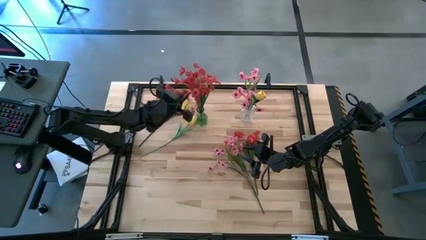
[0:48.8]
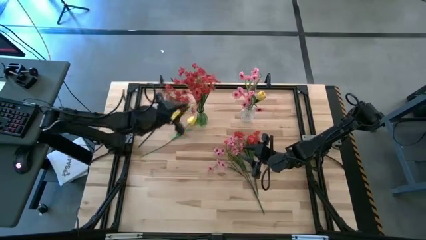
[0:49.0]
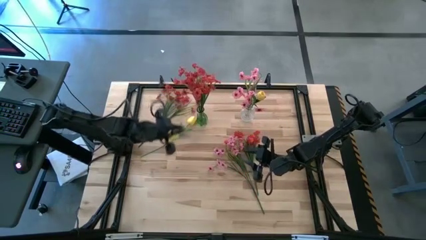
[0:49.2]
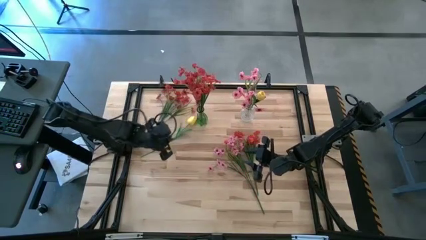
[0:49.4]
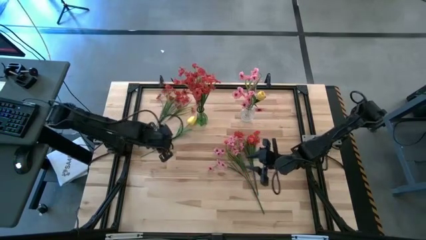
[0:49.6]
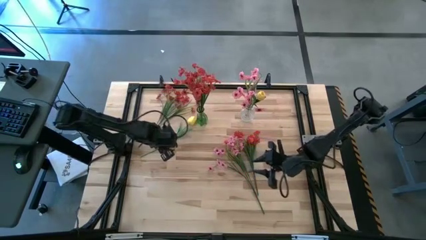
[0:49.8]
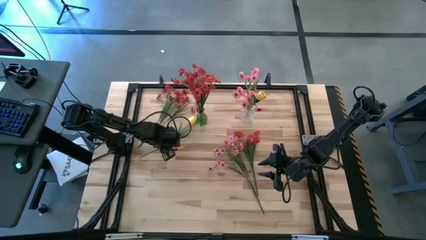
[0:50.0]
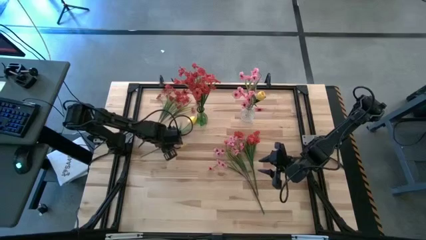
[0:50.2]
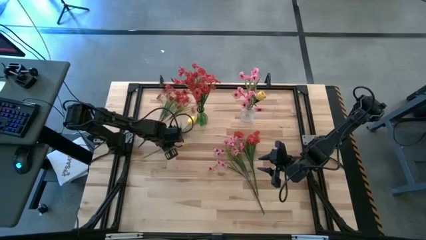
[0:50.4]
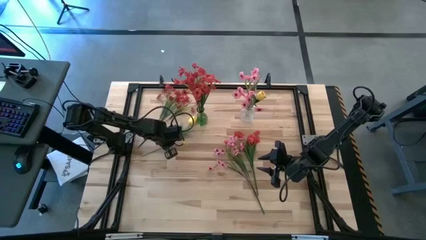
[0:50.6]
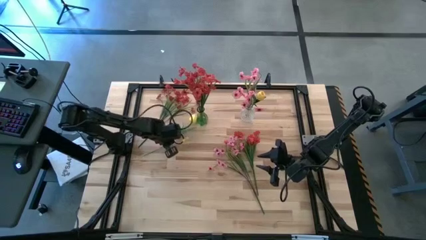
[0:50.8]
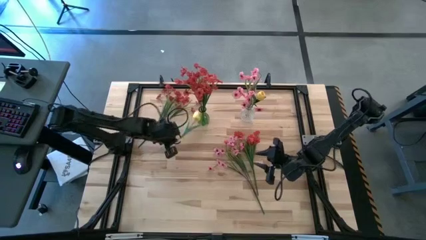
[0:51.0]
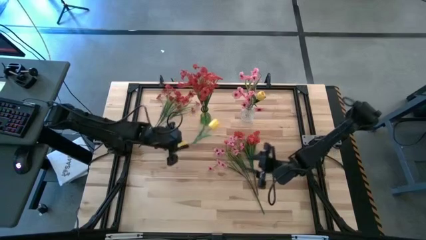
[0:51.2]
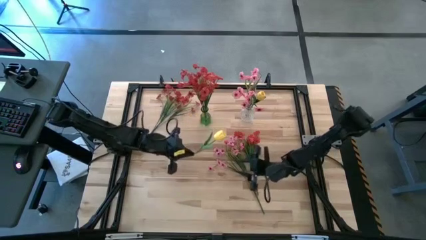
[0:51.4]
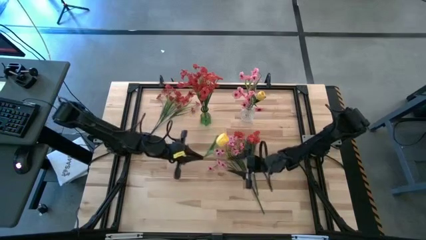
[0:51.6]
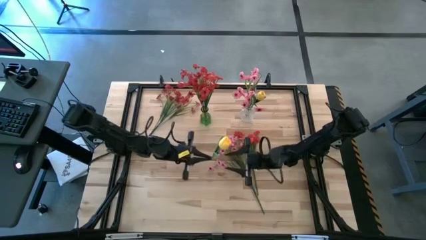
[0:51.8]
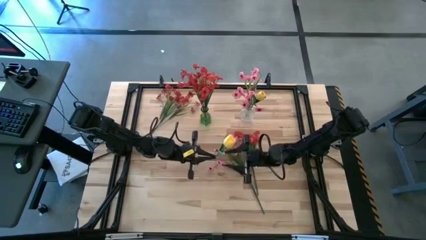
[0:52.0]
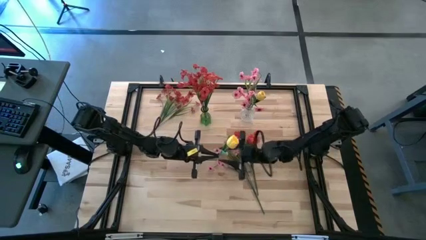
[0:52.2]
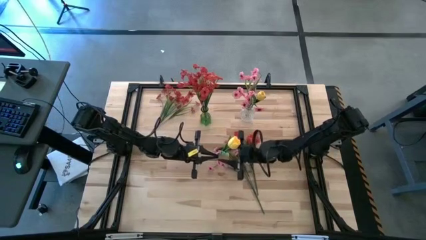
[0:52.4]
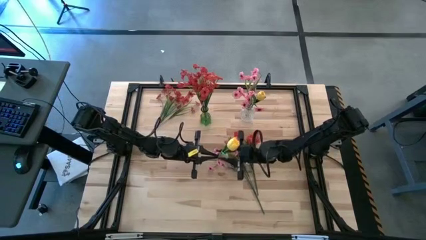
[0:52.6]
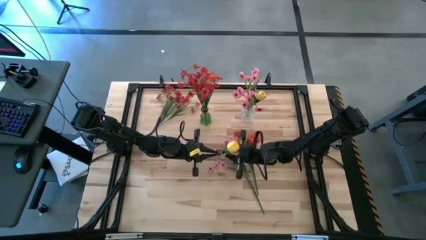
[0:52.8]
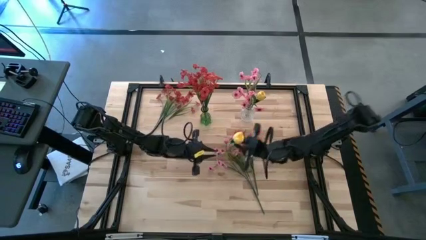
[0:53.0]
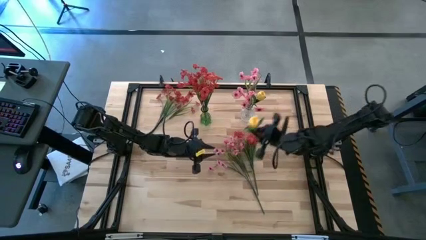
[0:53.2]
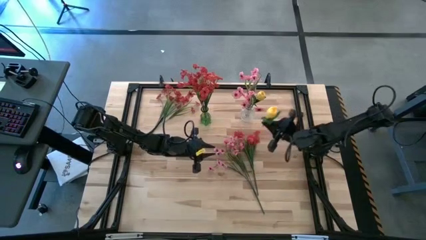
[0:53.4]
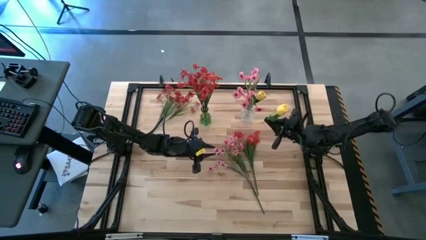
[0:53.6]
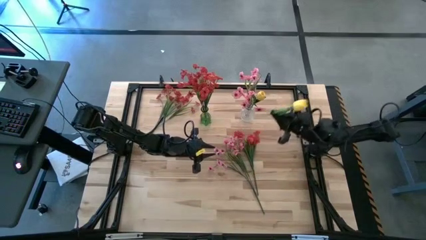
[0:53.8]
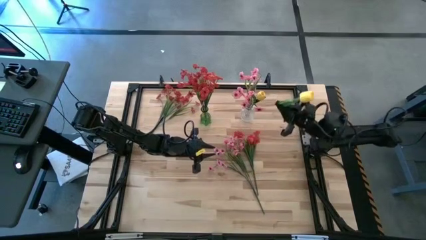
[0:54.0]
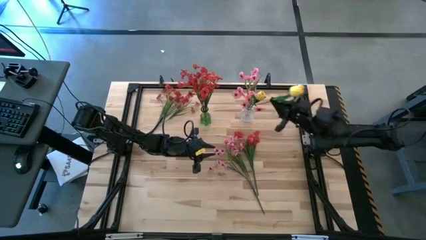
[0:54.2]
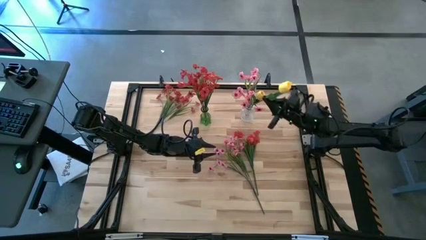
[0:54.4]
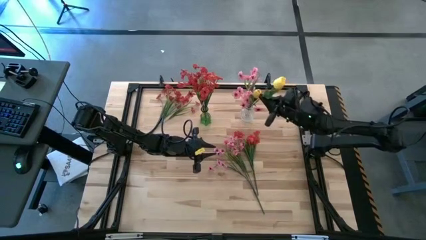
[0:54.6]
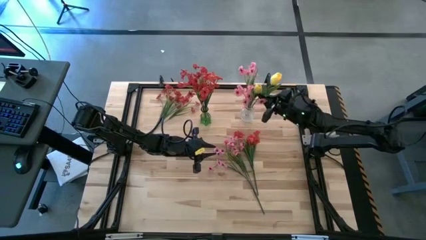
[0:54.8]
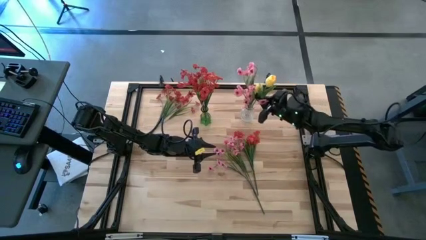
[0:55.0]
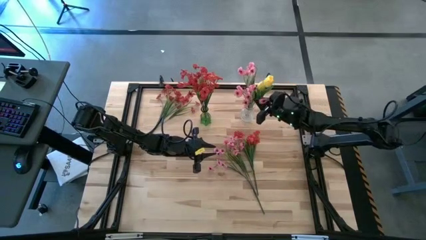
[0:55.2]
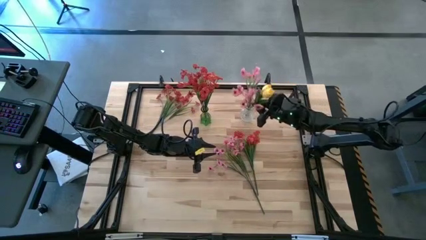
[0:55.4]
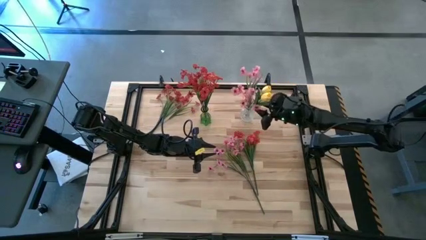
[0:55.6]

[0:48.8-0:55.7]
Task: Sort flowers into vase by color
Put the yellow flower into the transparent vase

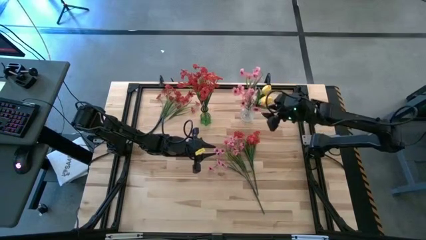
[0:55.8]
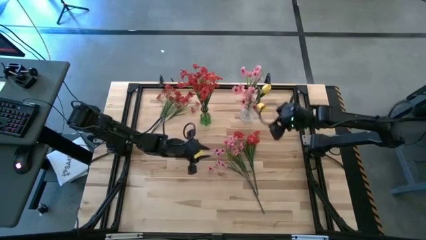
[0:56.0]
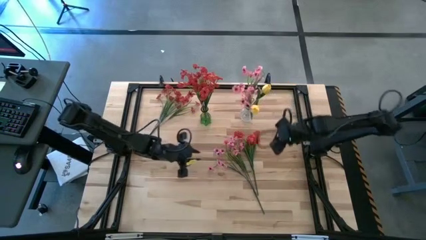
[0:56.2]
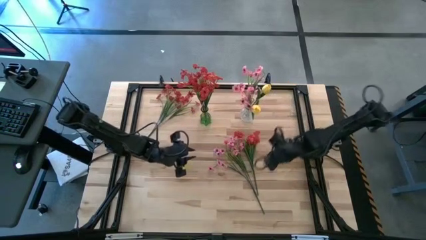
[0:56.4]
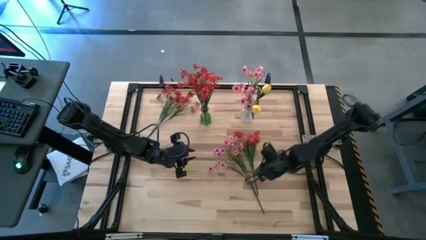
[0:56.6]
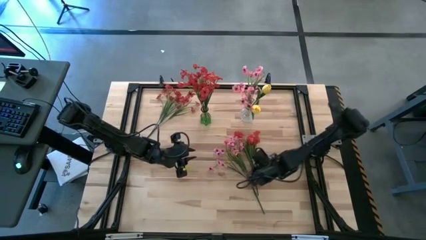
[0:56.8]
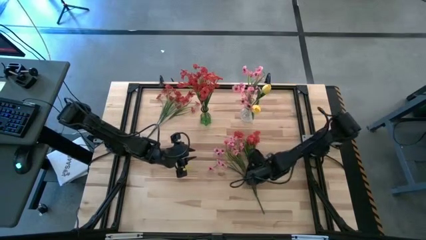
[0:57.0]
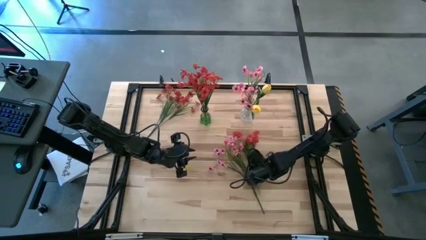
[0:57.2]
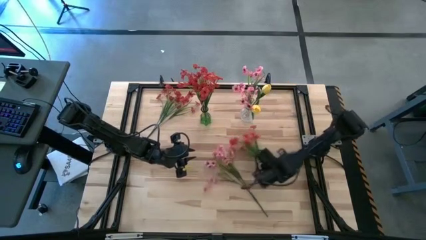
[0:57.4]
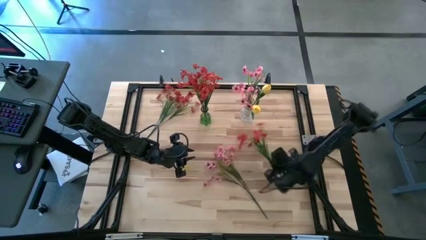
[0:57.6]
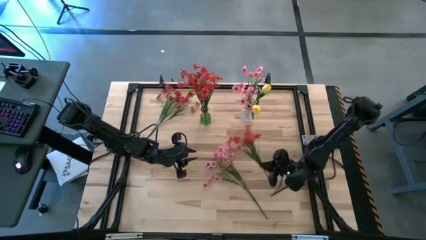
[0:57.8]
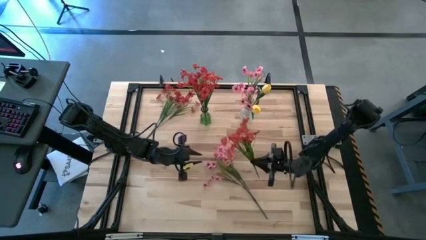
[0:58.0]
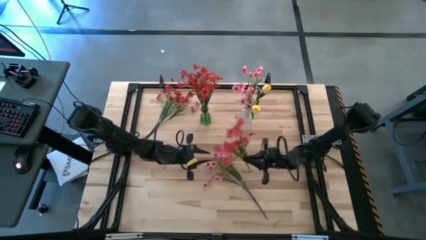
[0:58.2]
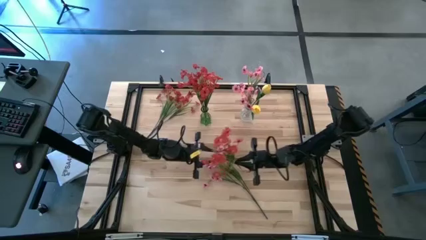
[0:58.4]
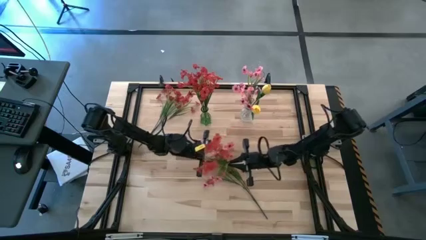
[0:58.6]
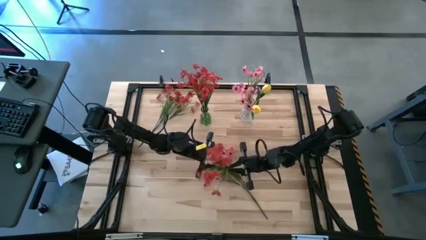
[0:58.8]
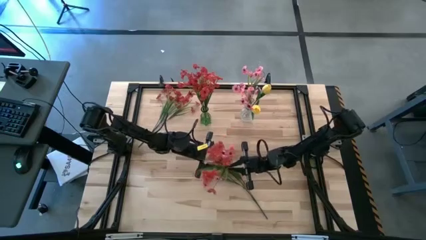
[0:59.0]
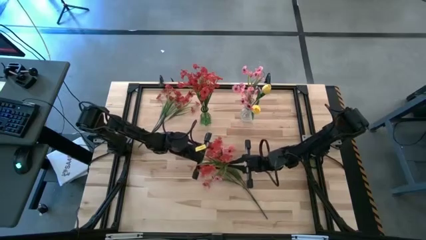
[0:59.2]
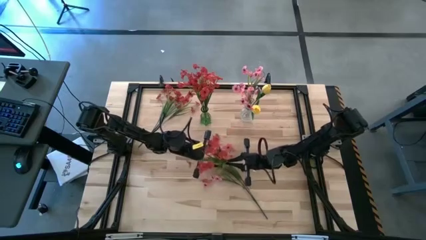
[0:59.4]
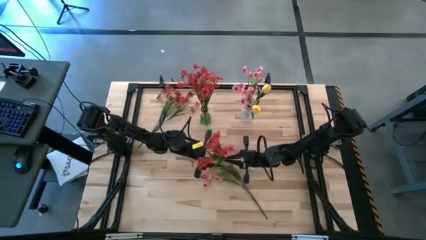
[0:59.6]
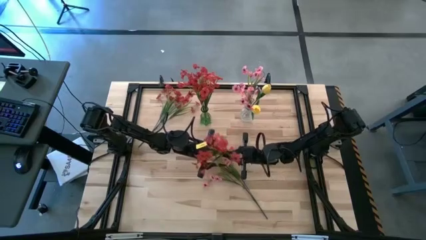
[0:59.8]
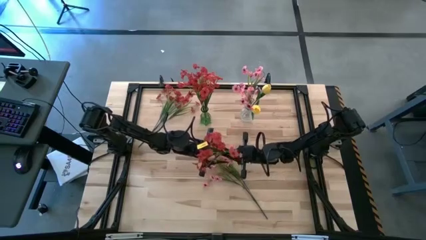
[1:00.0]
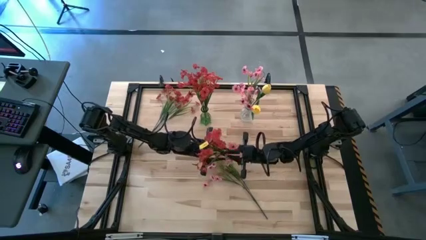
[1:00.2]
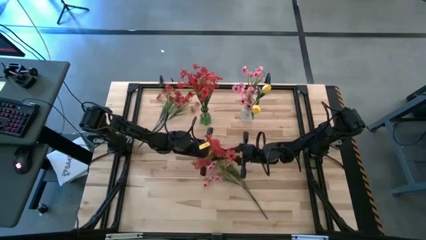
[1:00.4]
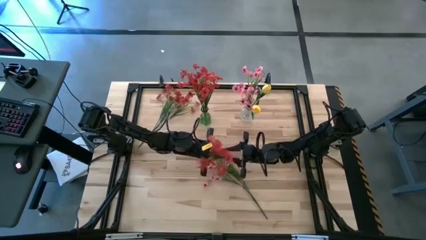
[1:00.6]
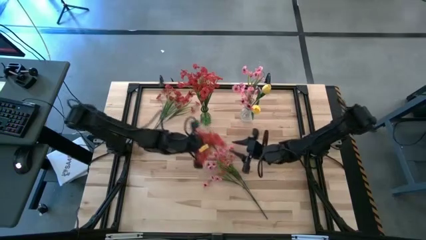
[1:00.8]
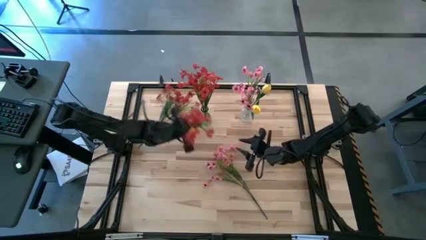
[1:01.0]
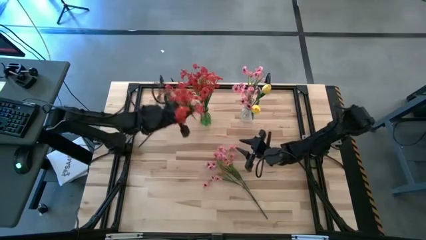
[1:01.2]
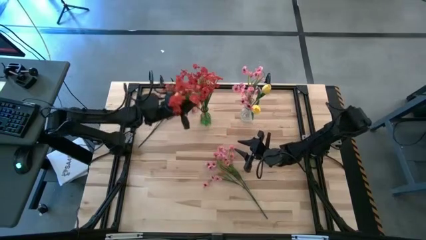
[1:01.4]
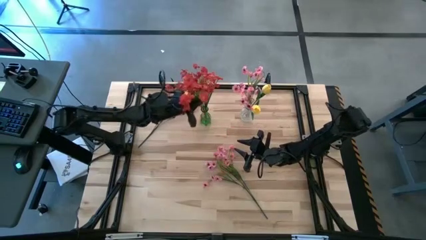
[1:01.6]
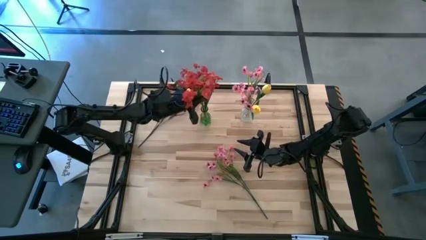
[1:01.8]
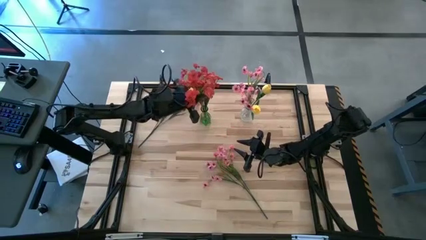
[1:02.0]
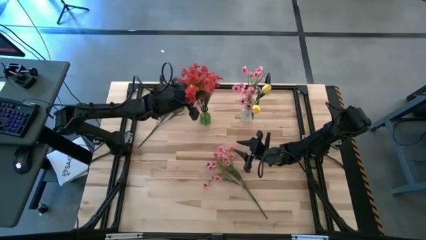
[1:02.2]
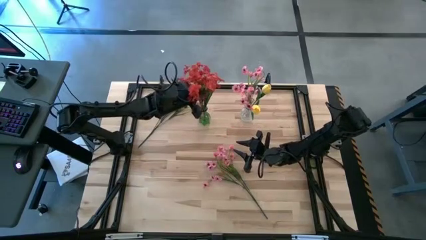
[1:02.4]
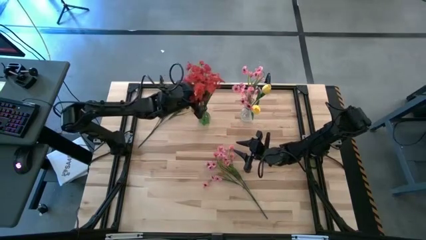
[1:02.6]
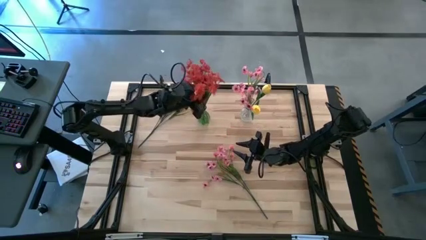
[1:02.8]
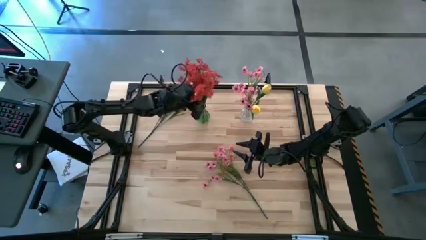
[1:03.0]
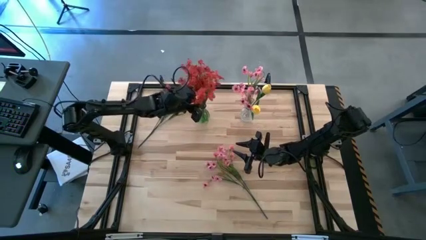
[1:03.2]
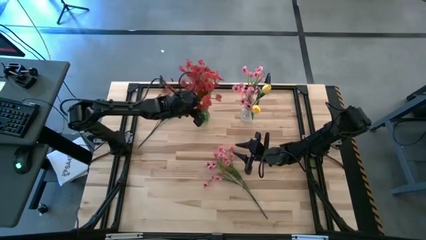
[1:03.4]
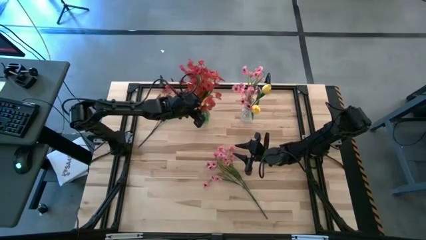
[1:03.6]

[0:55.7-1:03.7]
Put the bottom red flower into the green vase
